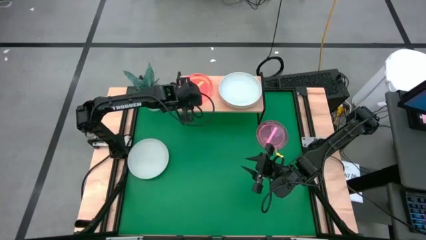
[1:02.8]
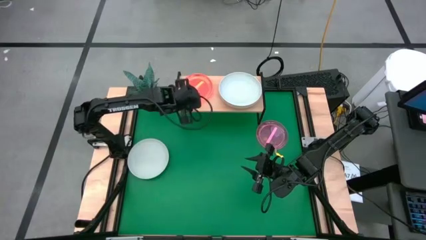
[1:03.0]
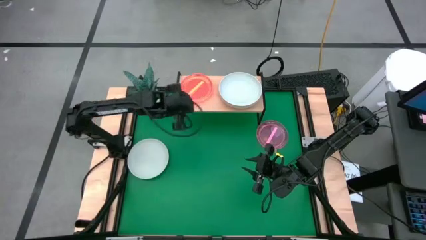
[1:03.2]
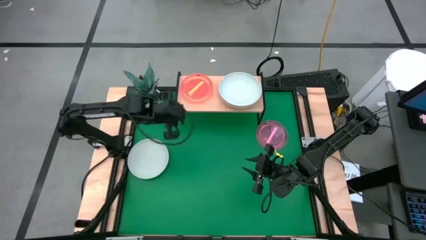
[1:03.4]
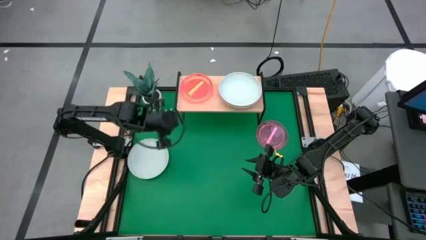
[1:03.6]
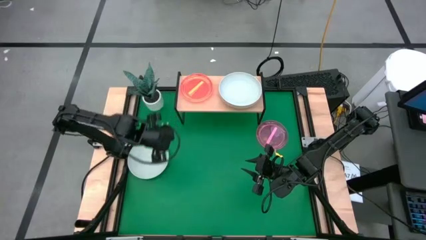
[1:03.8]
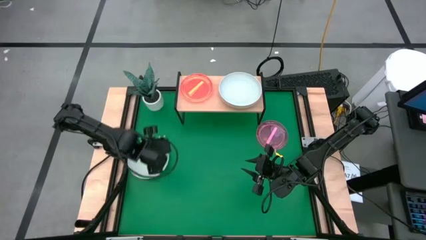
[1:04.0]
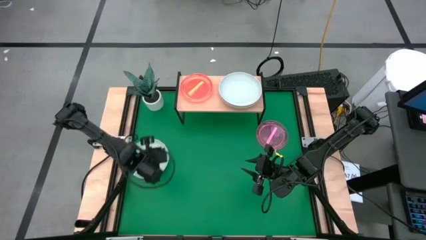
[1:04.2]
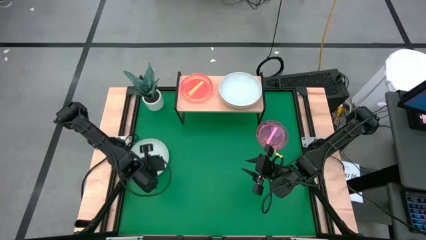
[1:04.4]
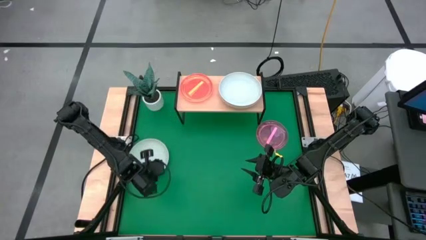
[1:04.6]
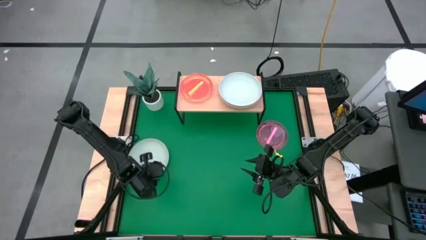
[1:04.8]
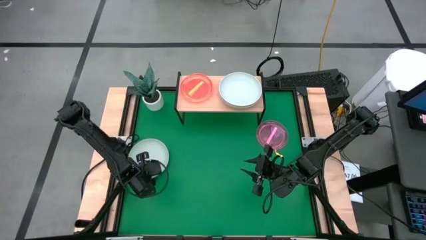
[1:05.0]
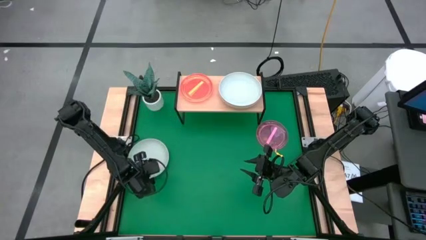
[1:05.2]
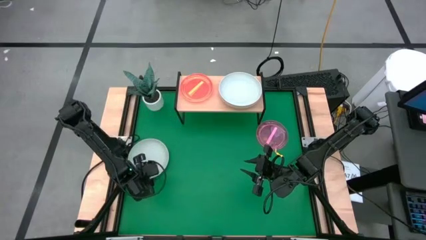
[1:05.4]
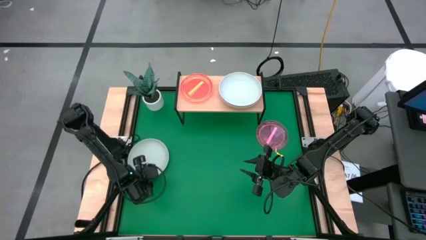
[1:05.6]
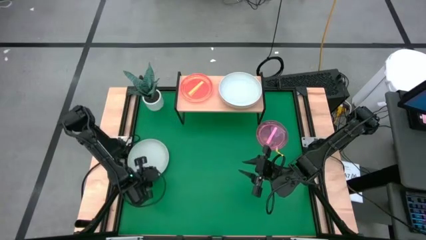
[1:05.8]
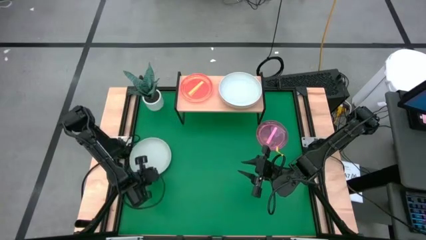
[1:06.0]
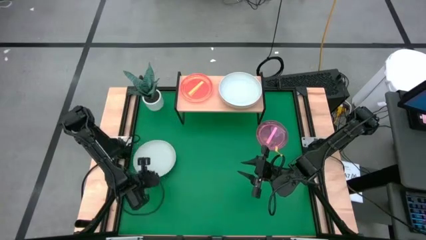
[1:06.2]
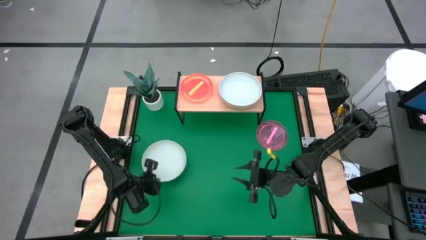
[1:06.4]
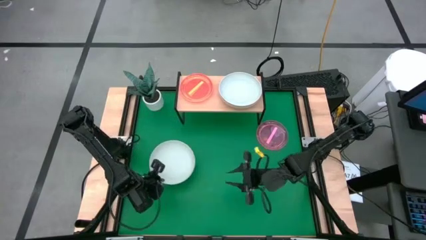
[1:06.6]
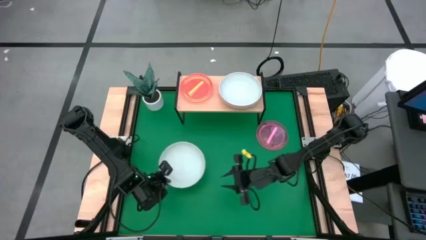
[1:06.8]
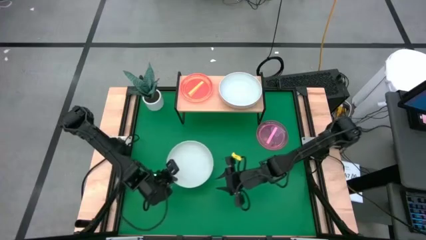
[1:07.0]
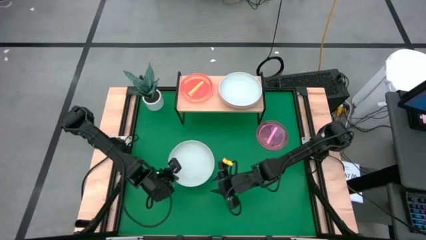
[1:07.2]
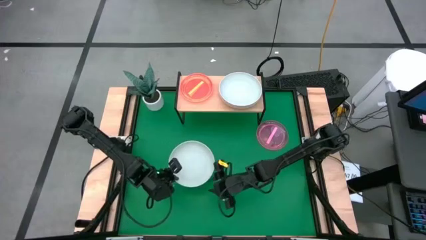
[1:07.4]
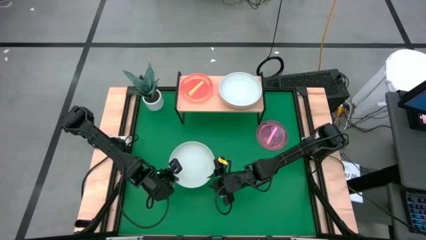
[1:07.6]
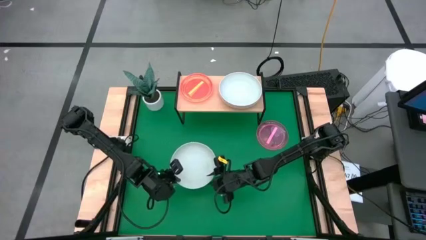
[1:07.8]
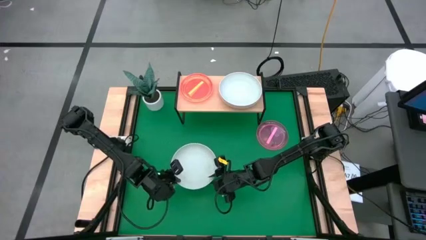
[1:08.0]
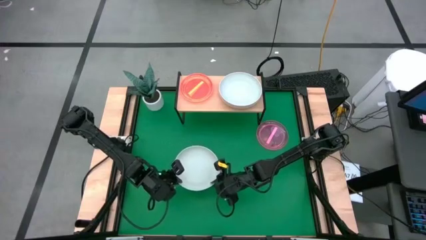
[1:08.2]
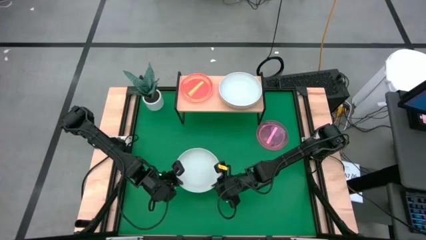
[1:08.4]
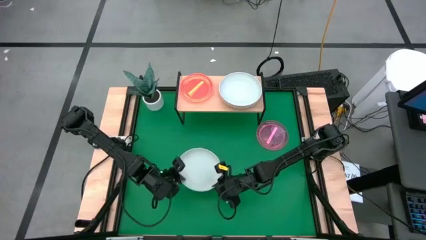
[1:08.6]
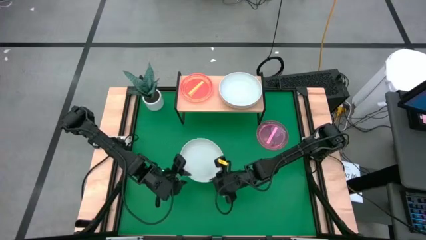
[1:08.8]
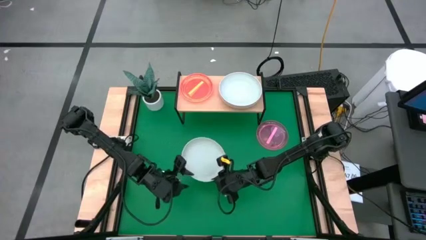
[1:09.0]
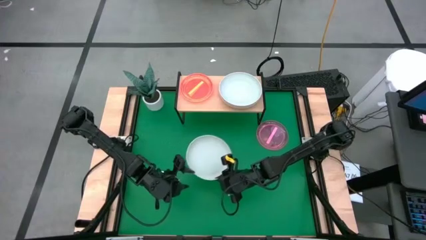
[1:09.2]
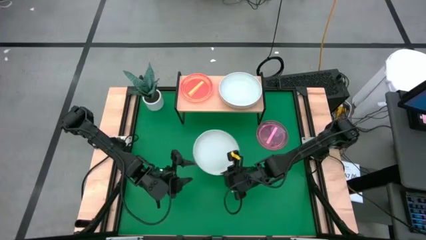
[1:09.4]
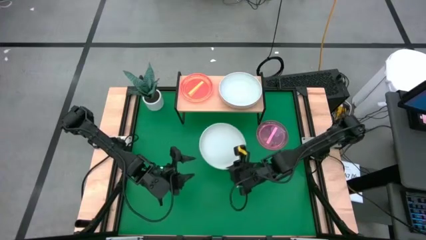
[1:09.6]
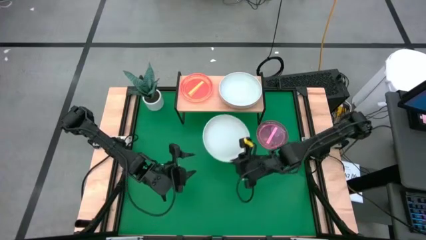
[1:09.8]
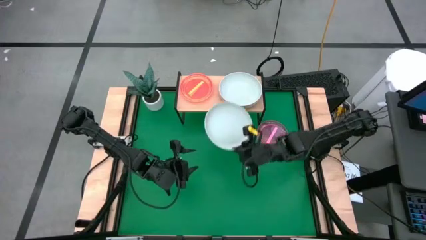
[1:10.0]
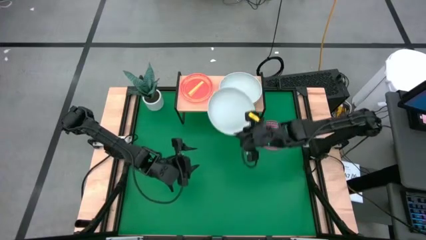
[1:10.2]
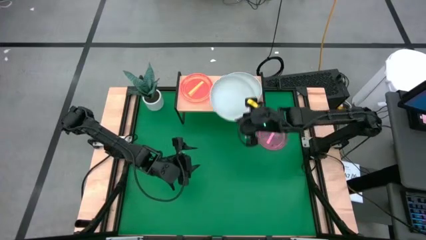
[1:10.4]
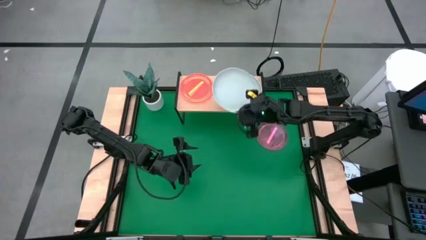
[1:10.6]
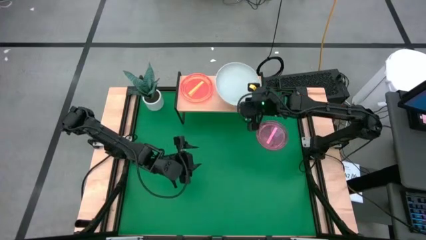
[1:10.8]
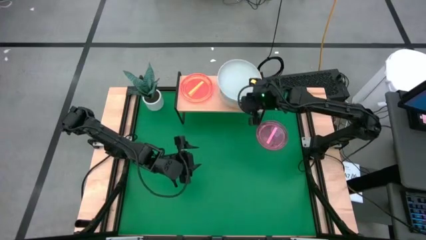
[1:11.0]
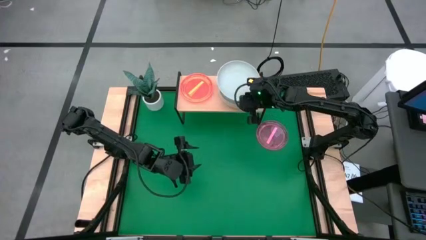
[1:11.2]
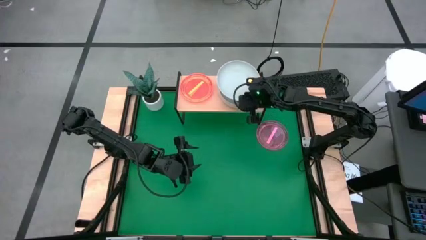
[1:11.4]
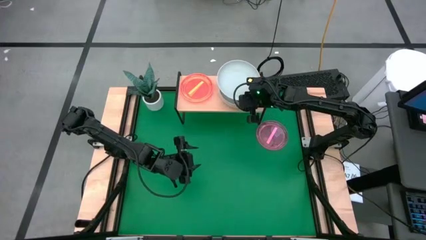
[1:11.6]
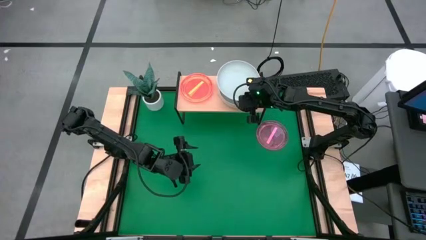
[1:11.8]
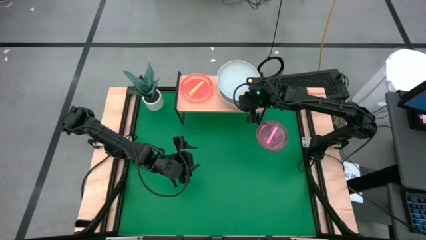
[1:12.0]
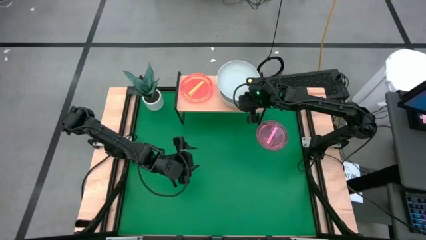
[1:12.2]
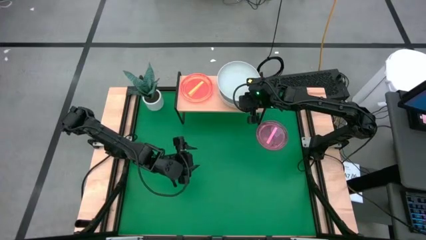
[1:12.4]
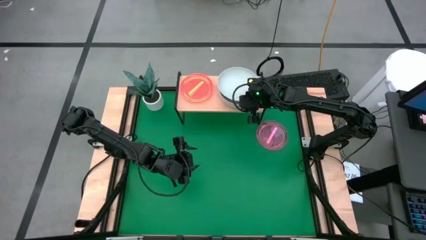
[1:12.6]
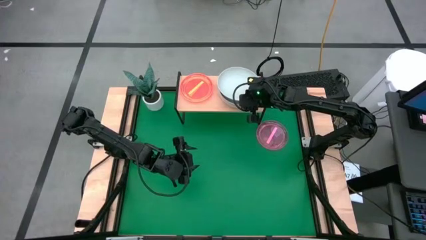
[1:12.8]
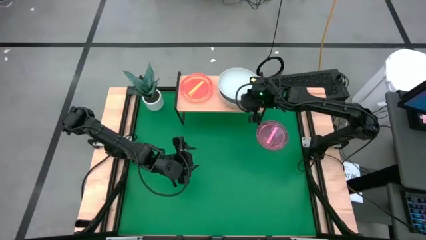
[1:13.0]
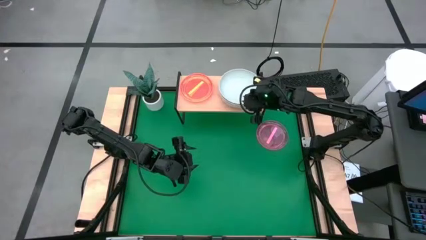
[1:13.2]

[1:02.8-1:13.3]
Task: Place and stack plates onto a shelf
Stack the gray plate on top of the gray plate on the shelf

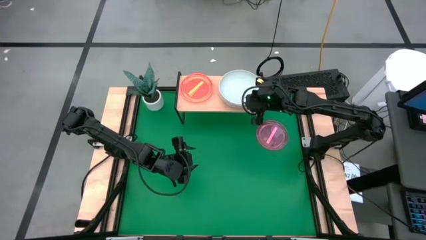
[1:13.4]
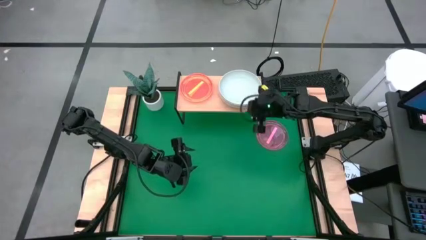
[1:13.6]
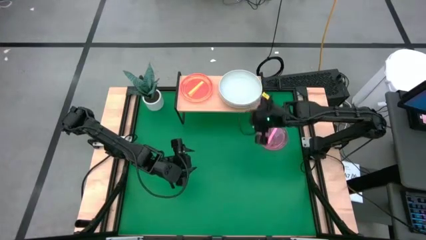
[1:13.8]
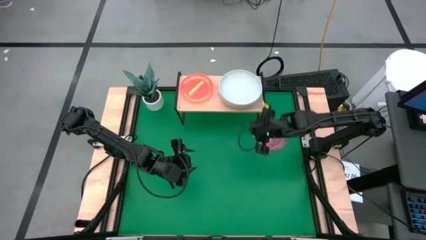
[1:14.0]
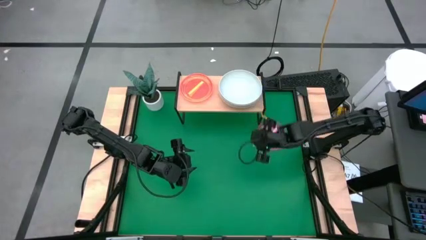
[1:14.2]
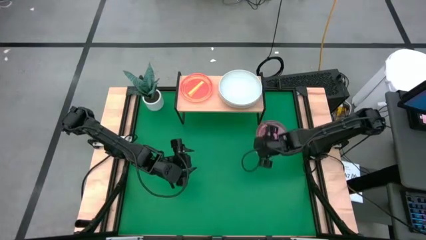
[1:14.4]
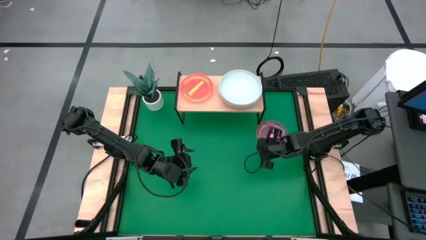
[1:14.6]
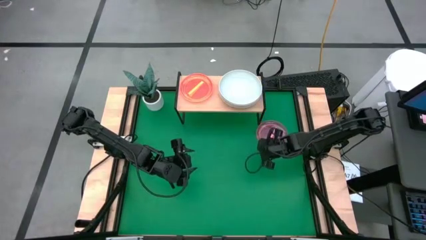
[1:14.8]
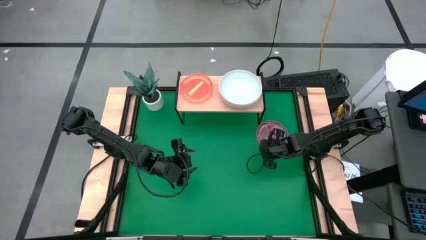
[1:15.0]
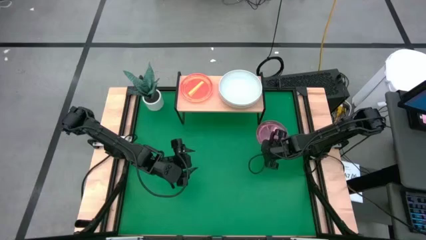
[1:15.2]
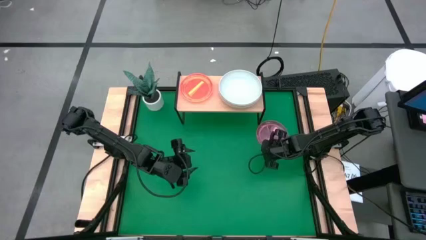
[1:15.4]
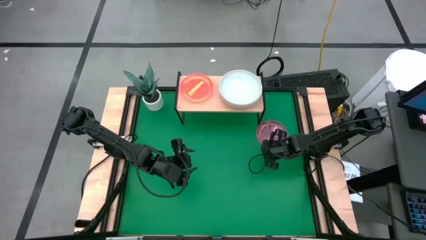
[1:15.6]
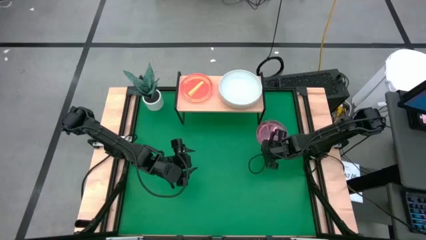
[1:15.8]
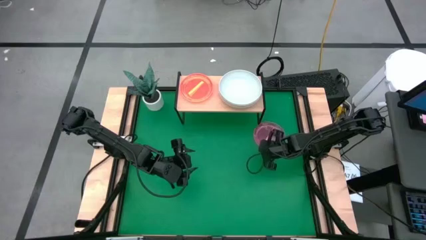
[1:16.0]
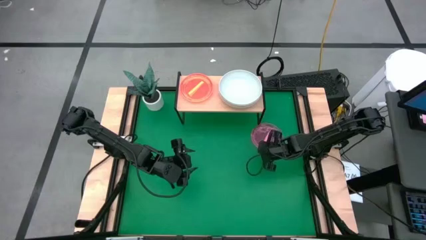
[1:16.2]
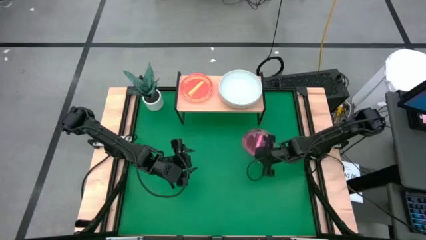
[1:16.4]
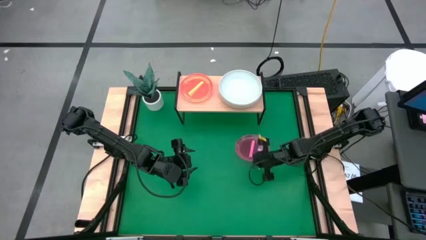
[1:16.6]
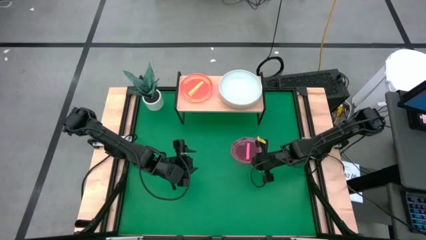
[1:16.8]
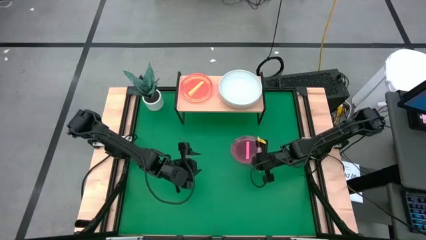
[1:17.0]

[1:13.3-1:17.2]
Stack the transparent pink plate on top of the transparent orange plate on the shelf

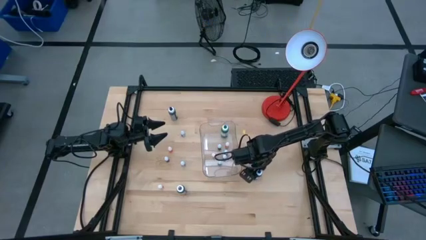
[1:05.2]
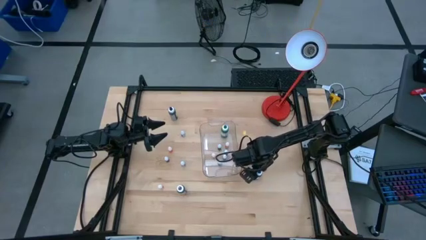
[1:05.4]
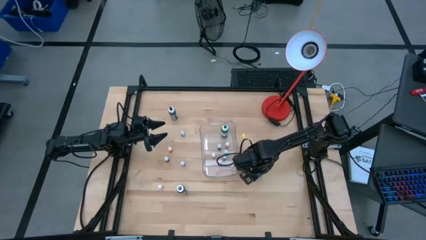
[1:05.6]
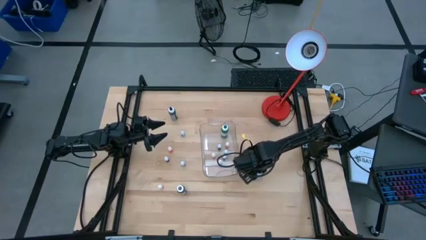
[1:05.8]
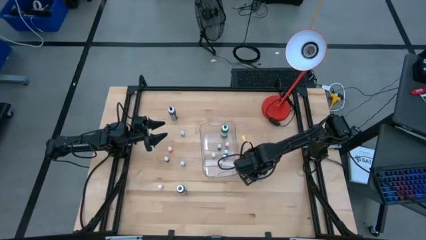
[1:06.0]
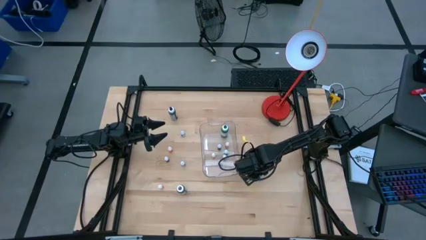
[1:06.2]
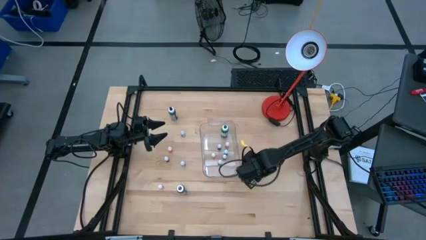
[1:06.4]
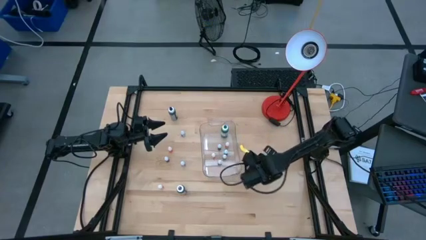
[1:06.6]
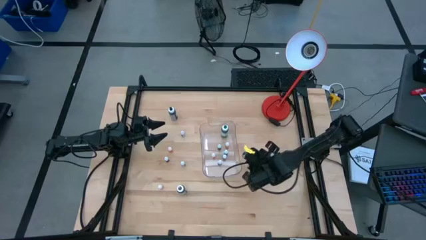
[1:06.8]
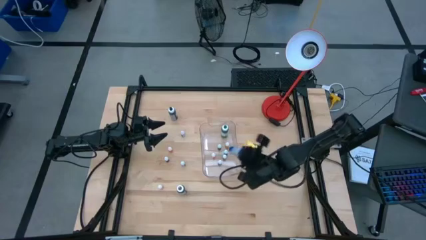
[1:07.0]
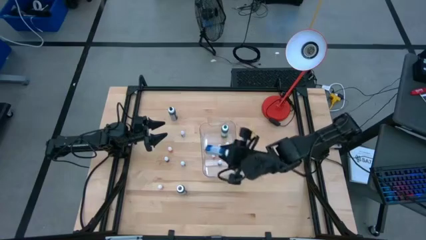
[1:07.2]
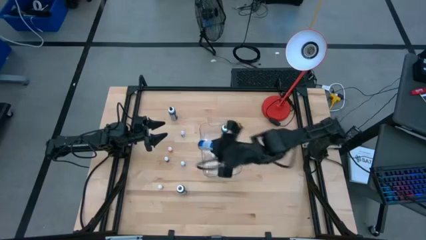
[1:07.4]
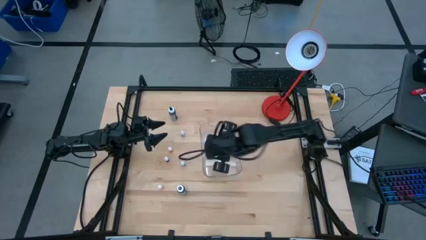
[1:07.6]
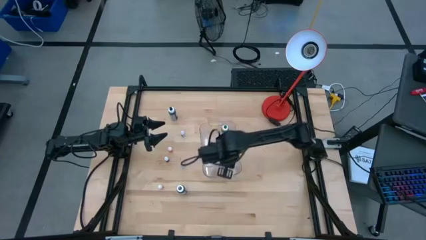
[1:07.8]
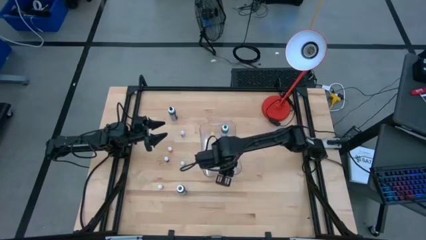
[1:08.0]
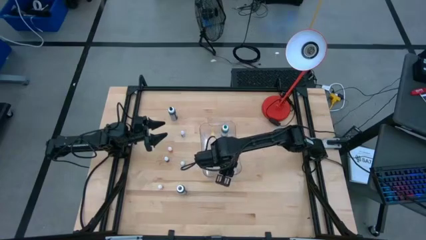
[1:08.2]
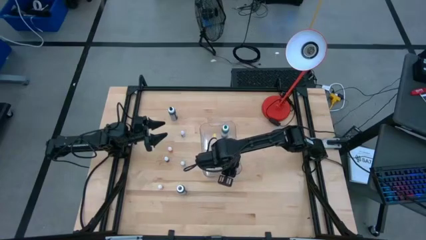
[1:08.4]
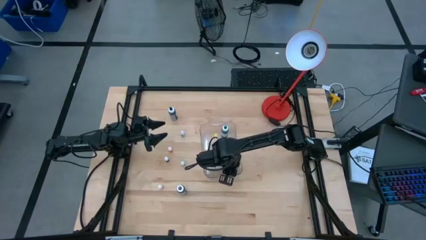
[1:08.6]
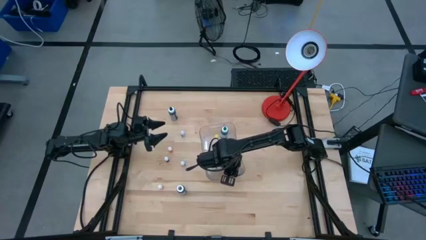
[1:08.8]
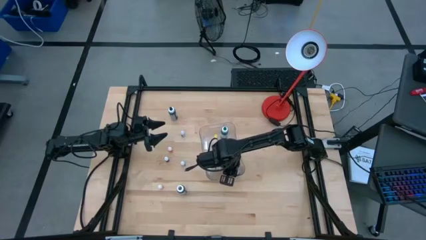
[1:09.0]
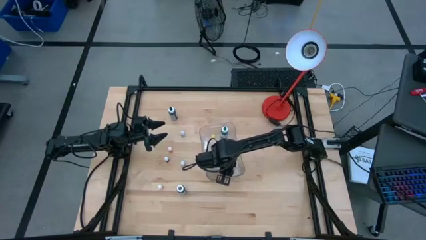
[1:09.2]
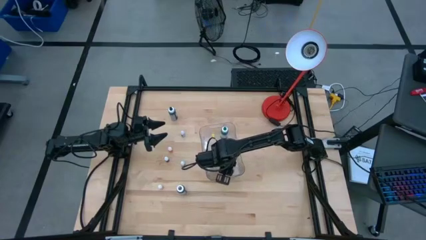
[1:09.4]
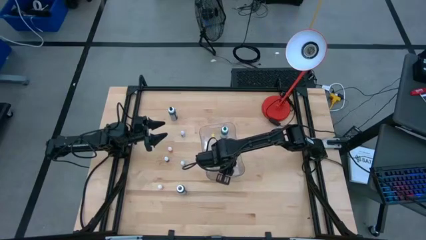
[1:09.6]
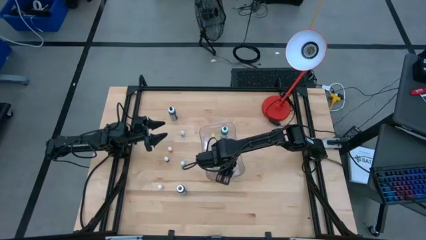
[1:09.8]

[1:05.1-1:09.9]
Task: Pick & Place food coloring
Put the big blue food coloring bottle into the transparent bin
